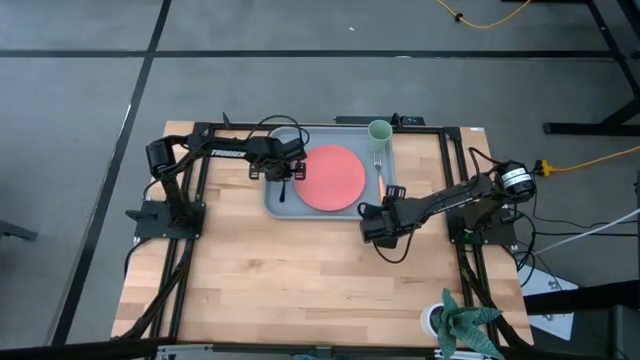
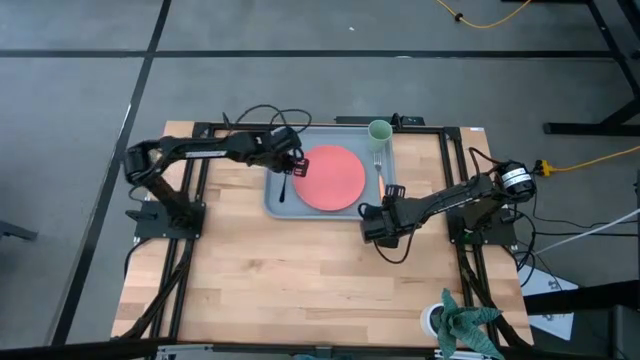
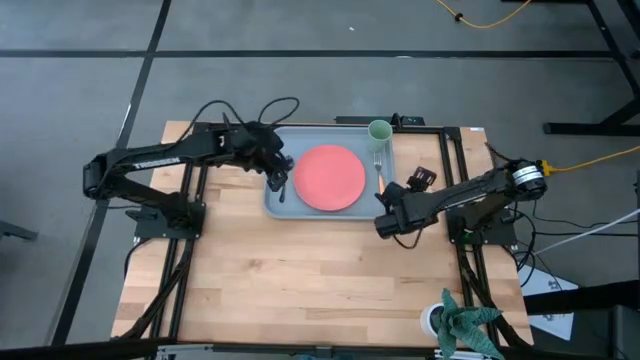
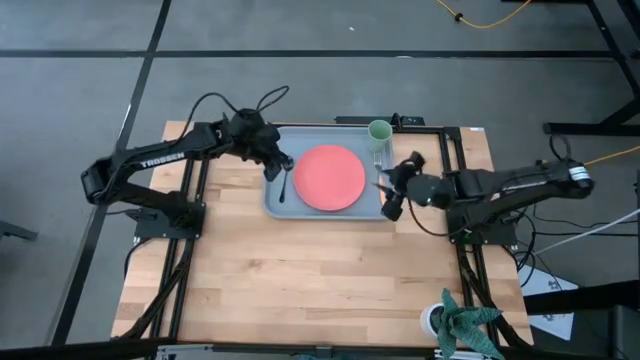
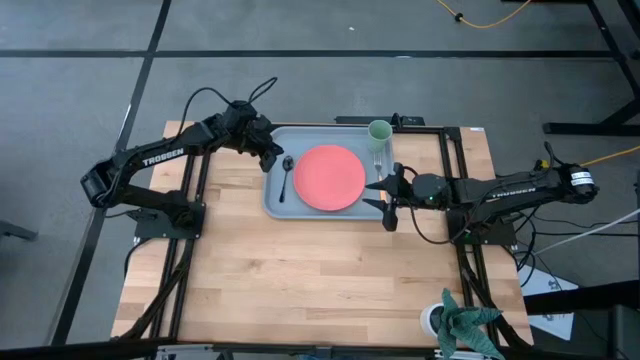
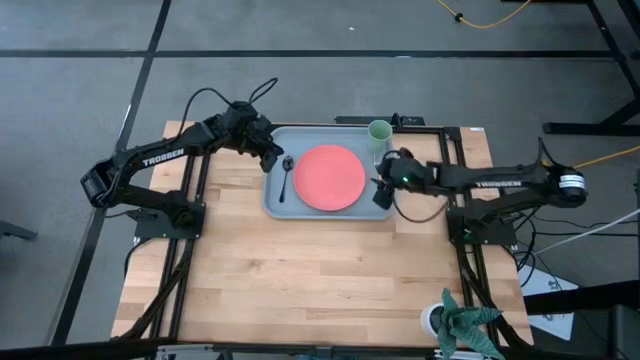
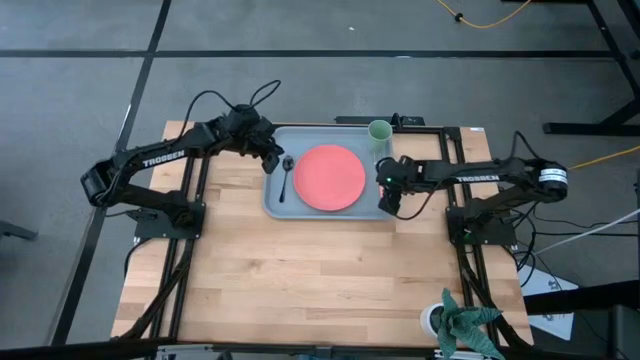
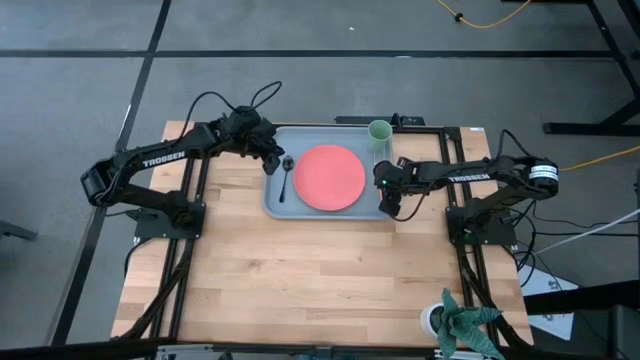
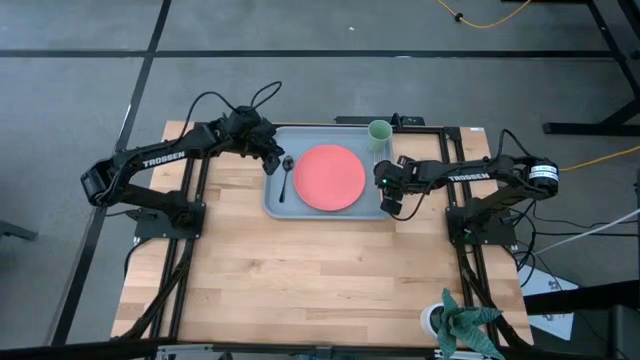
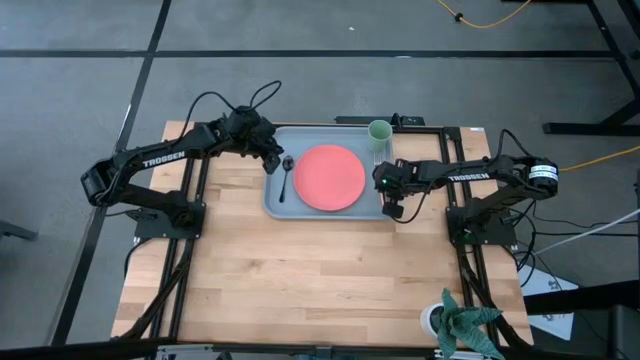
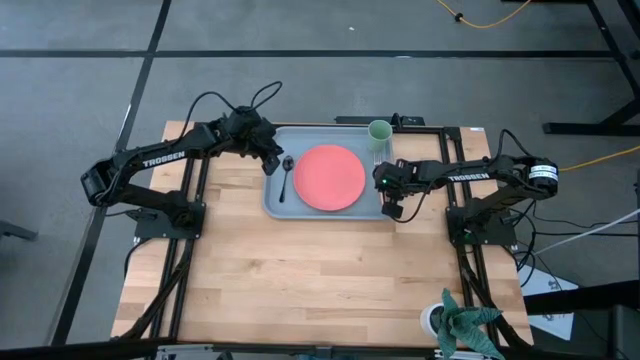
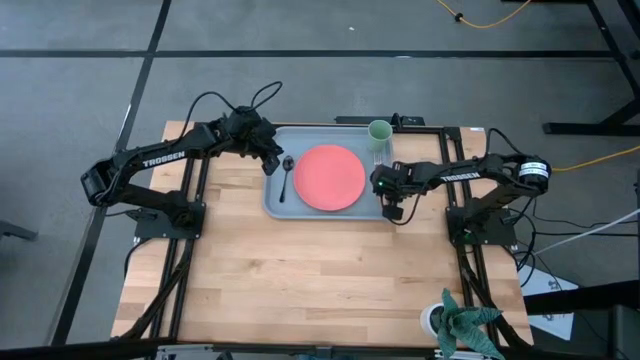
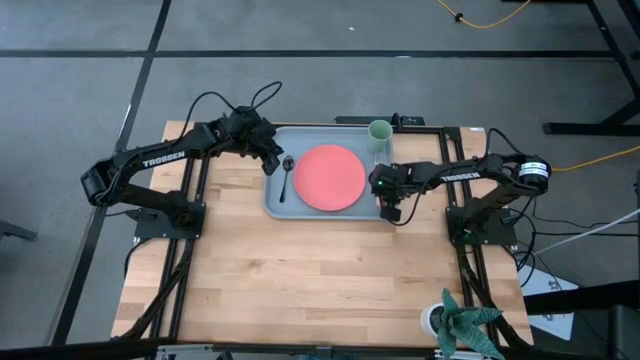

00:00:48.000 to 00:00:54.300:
Task: Pick and place plate/cup/fork/spoon on tray
Adjust the orange fork on the blue tray

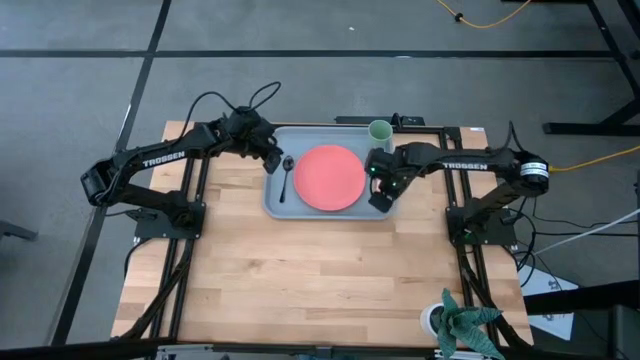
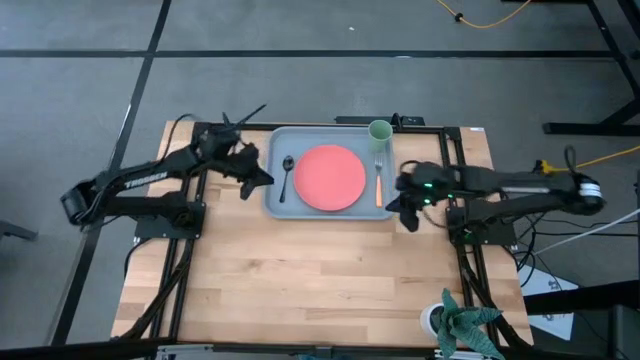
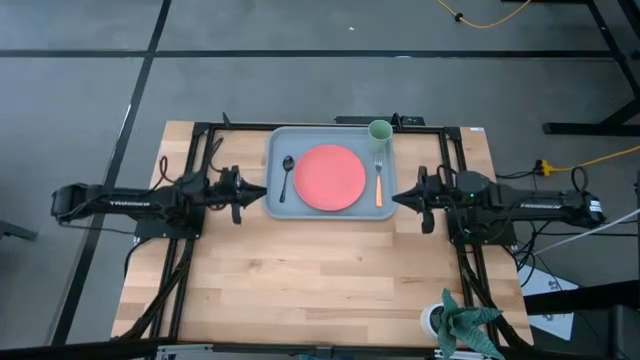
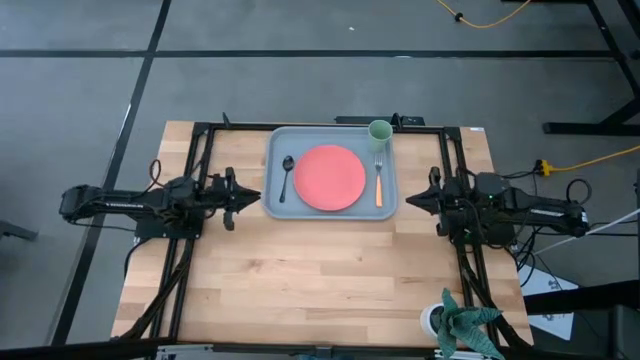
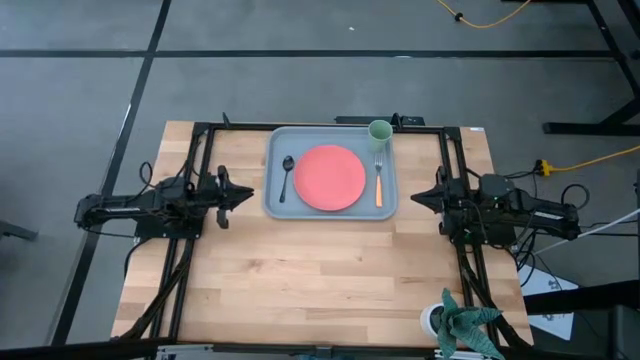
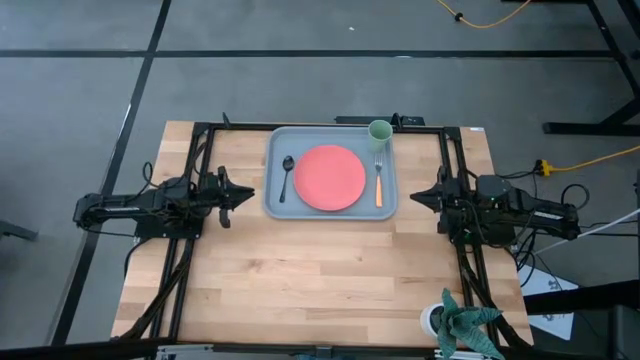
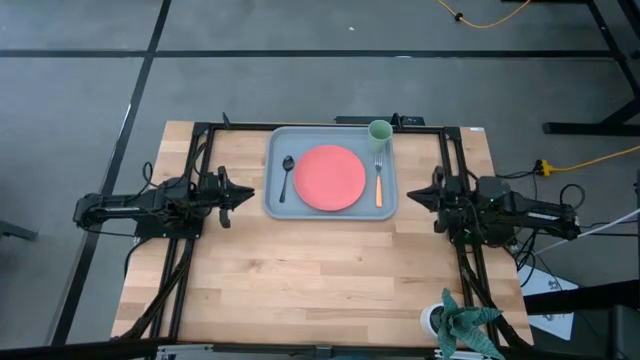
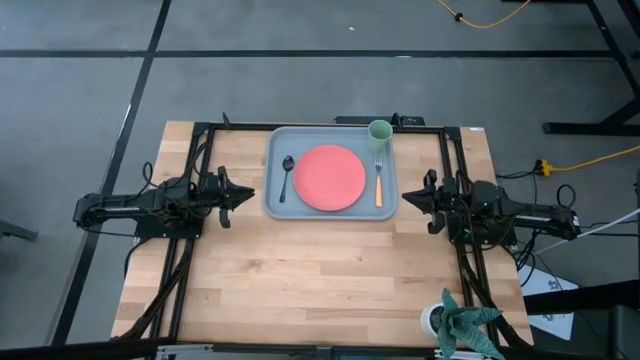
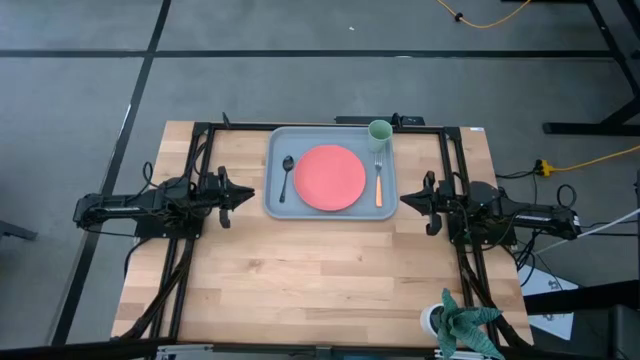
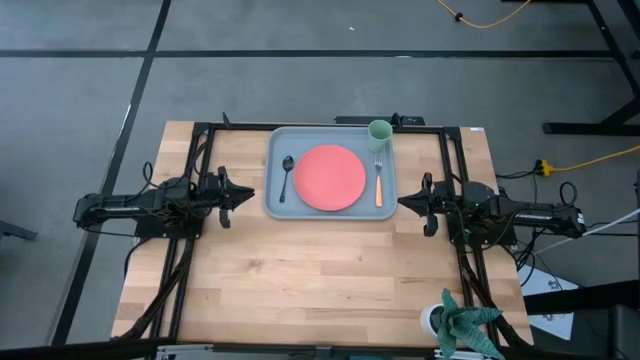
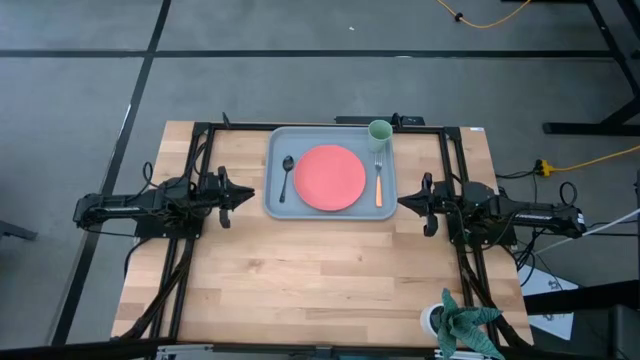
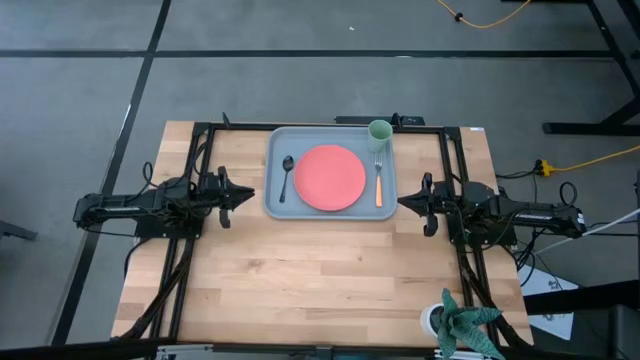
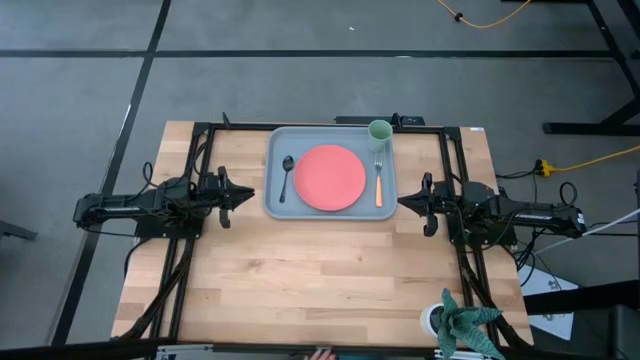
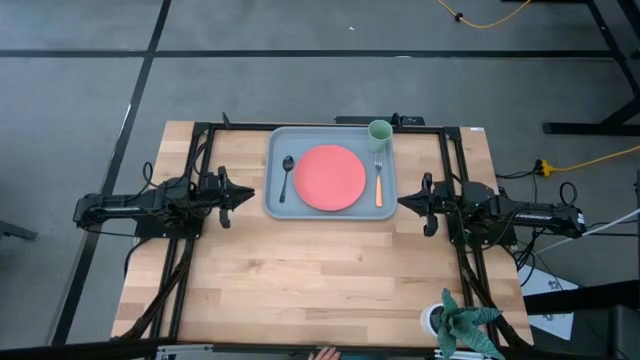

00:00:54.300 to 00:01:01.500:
Return to Home Position

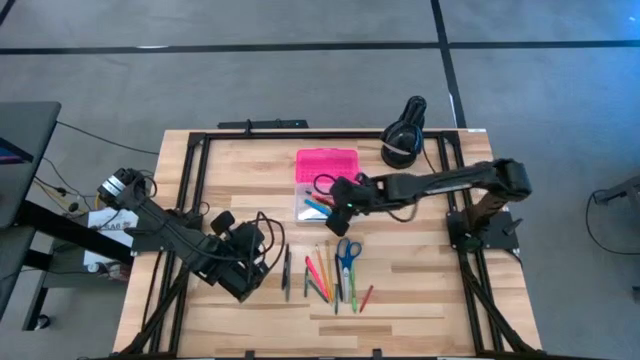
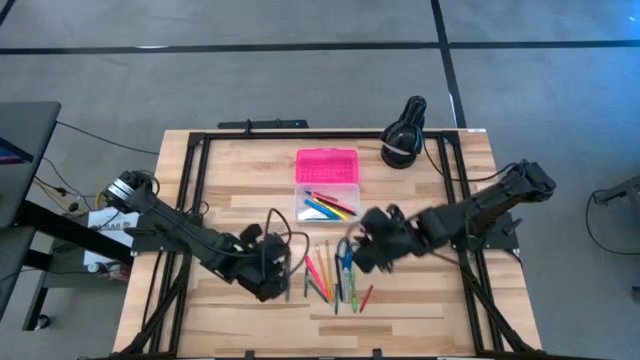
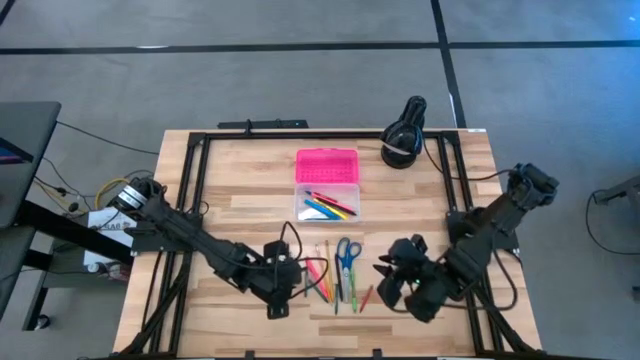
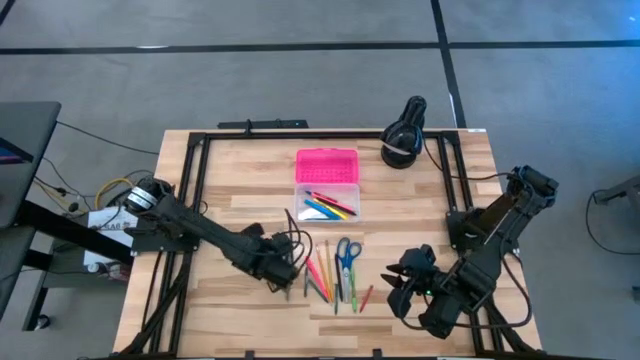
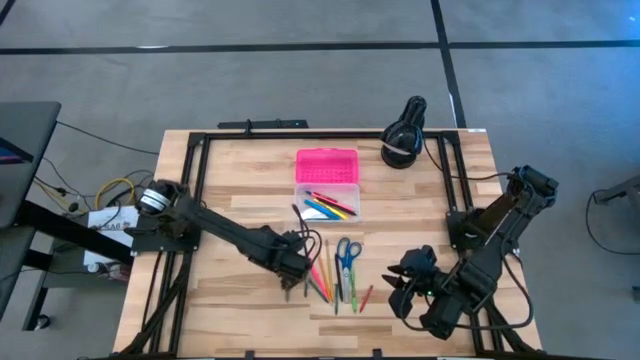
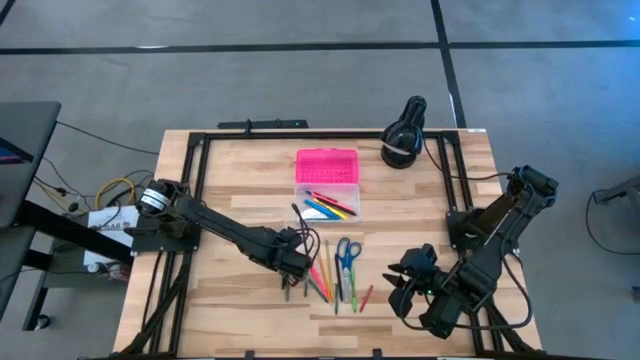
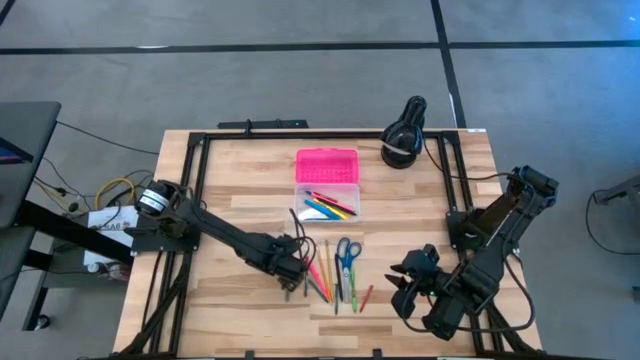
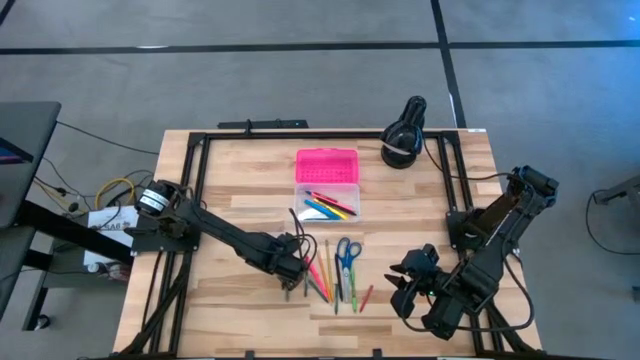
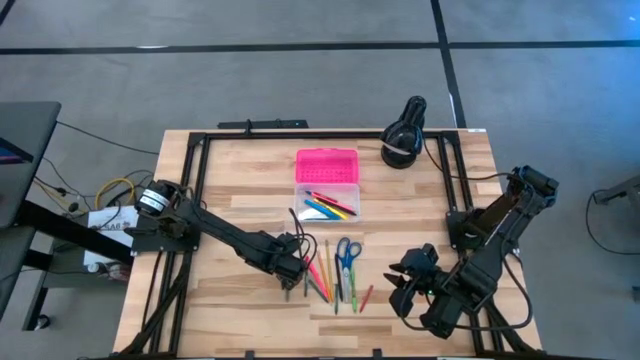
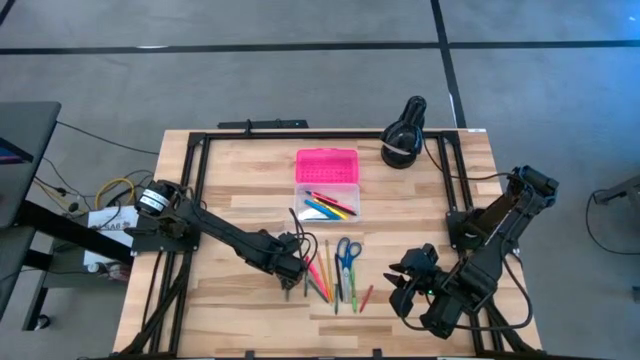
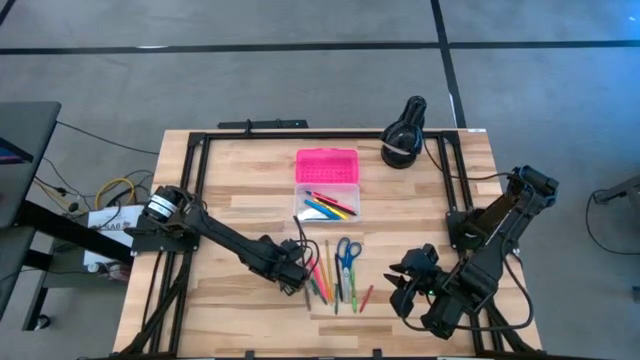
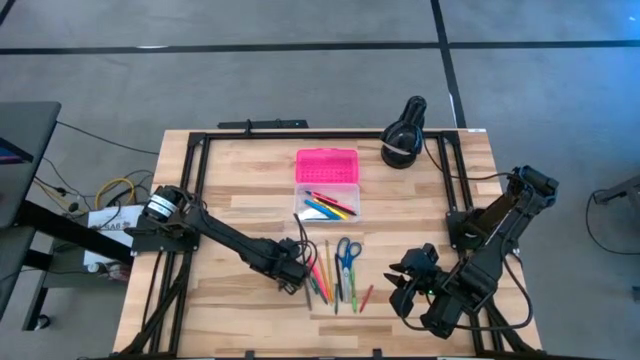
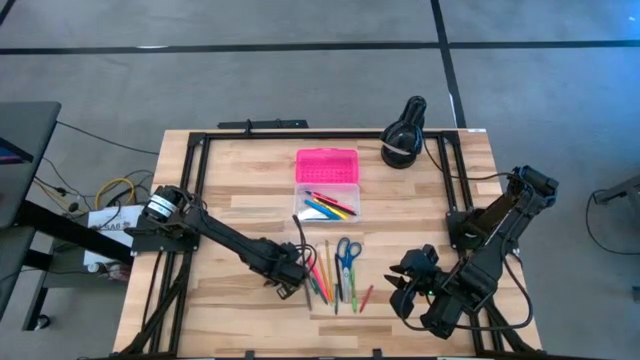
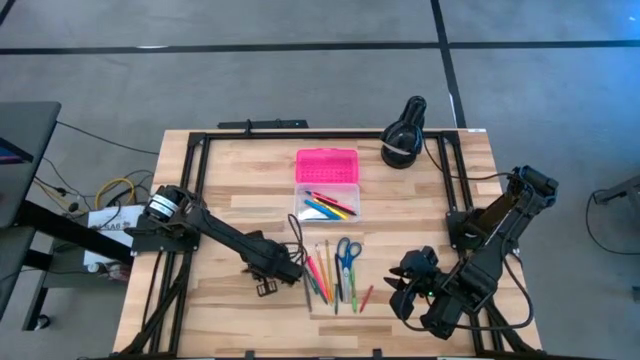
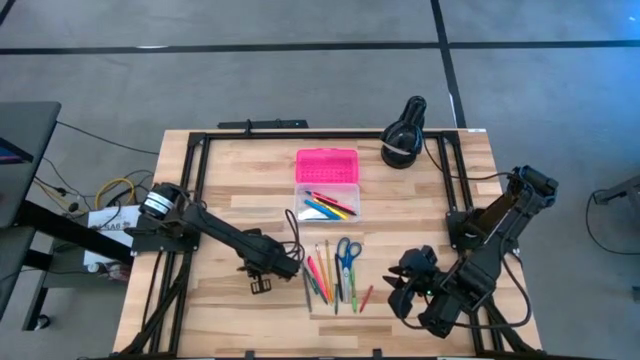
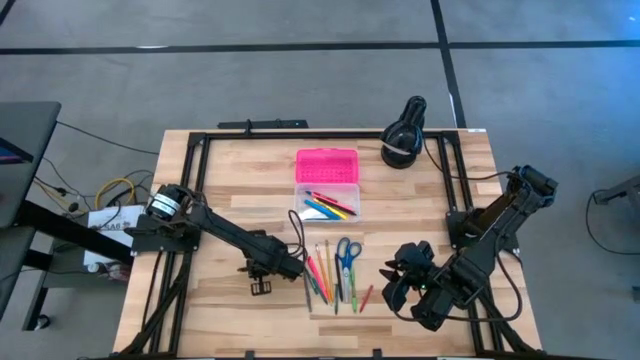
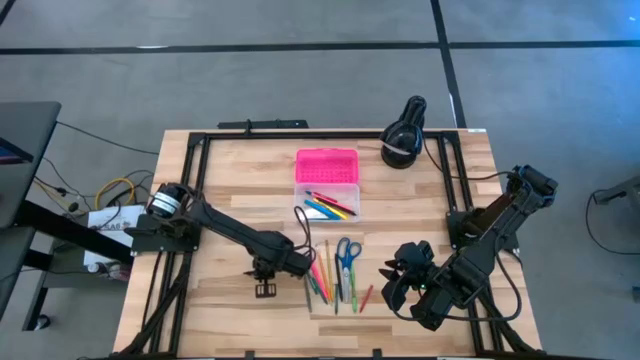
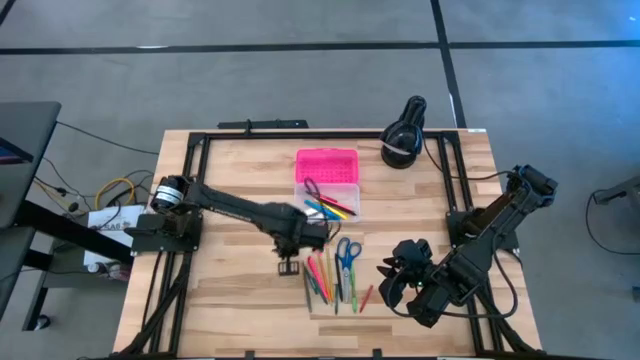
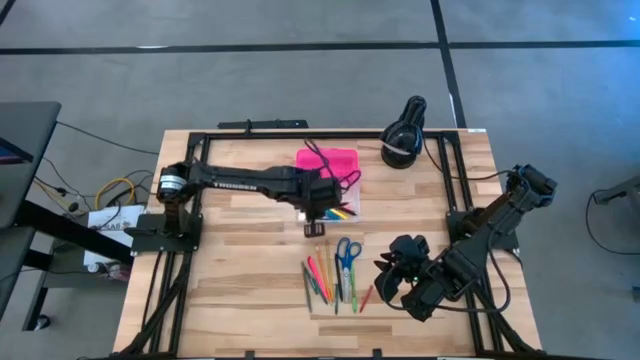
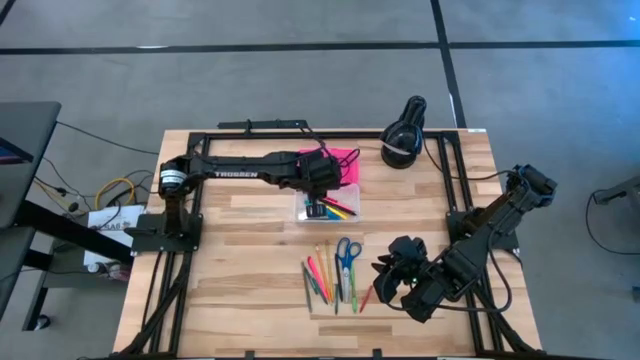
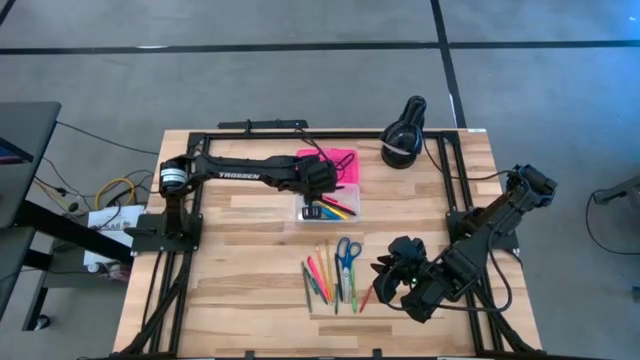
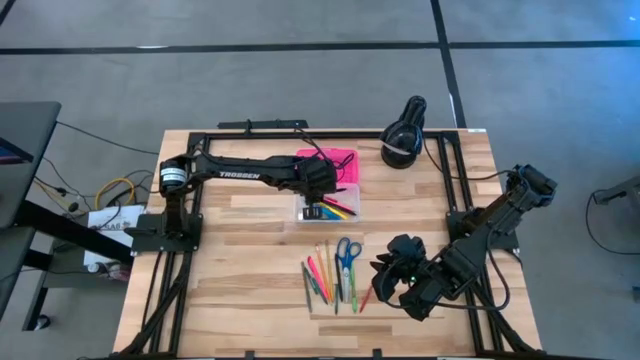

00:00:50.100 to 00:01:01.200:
Task: Pick & place school supplies into a supply box
Put the black pen into the pink supply box
